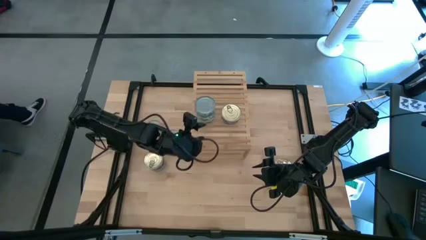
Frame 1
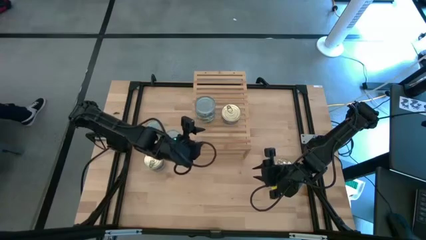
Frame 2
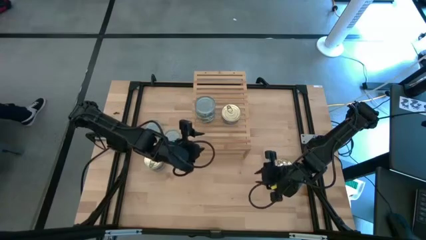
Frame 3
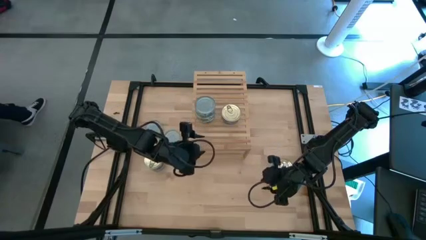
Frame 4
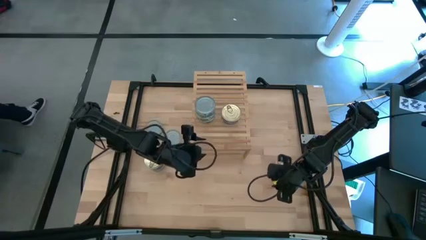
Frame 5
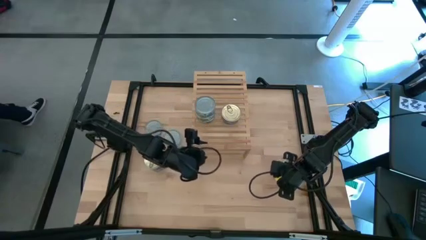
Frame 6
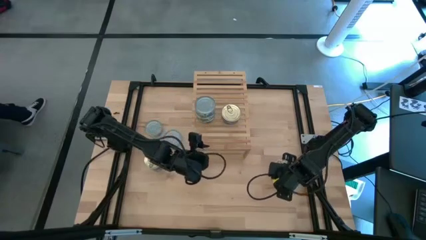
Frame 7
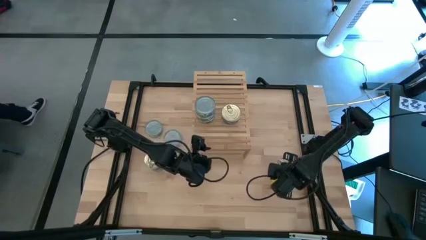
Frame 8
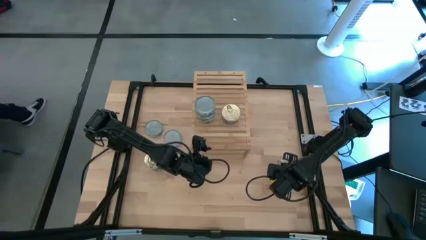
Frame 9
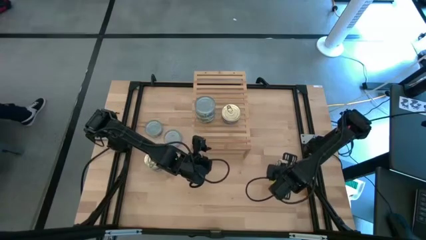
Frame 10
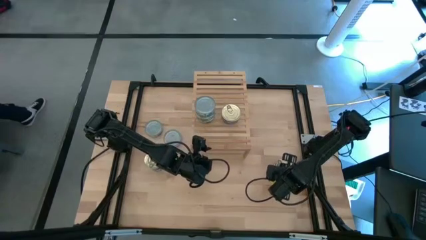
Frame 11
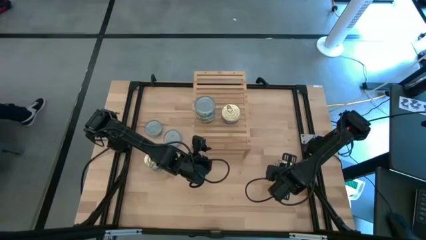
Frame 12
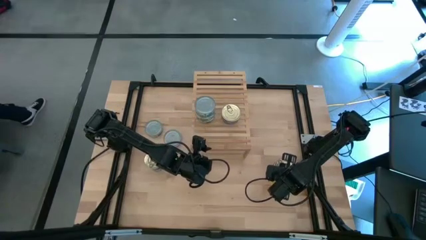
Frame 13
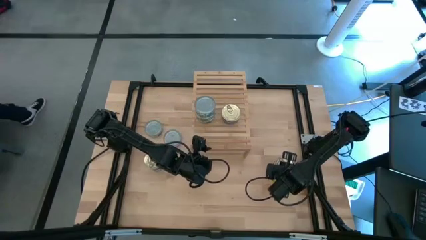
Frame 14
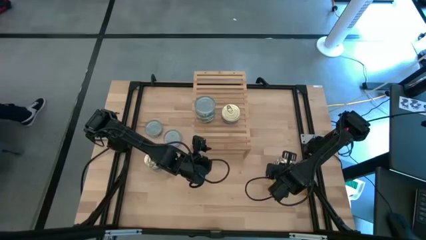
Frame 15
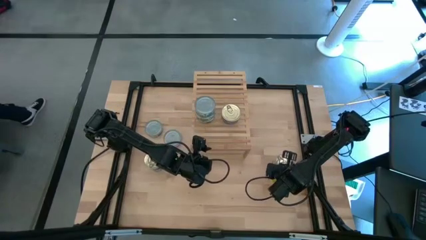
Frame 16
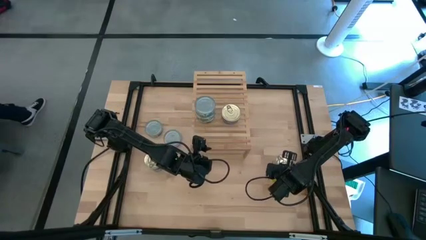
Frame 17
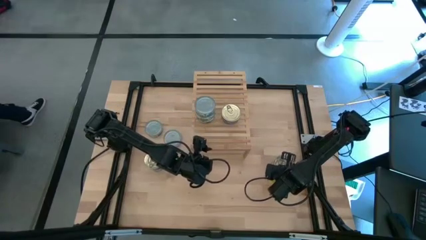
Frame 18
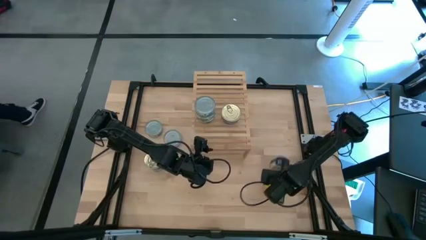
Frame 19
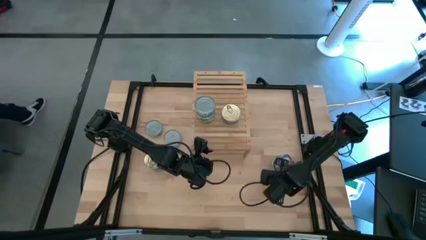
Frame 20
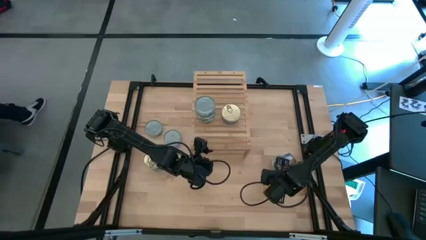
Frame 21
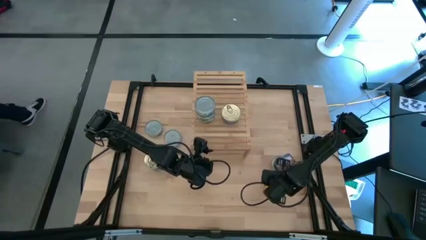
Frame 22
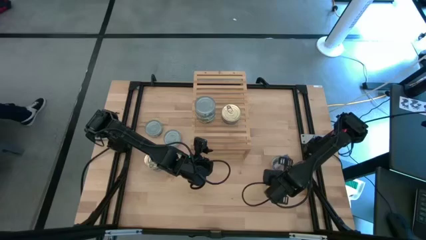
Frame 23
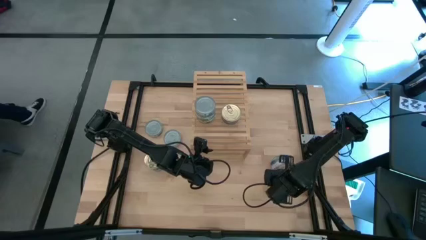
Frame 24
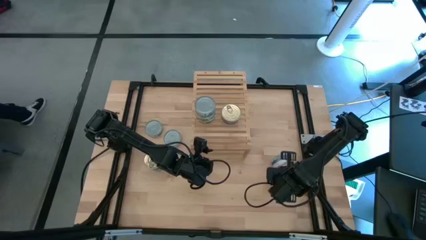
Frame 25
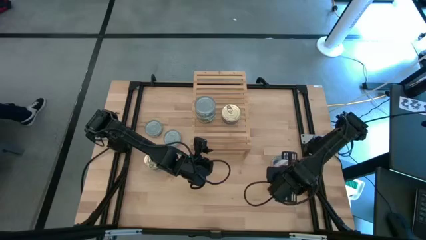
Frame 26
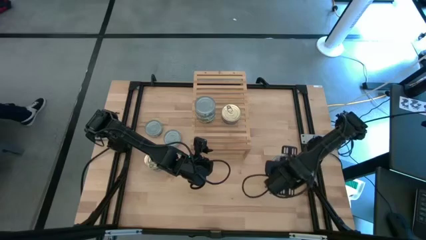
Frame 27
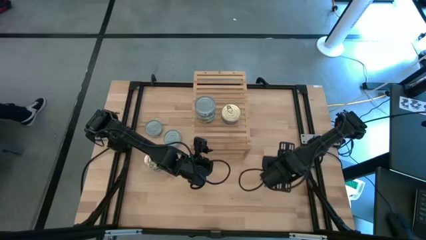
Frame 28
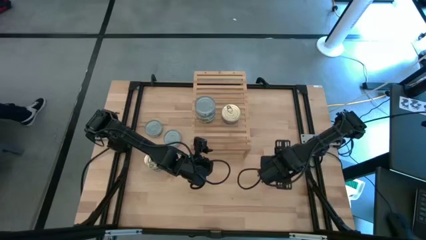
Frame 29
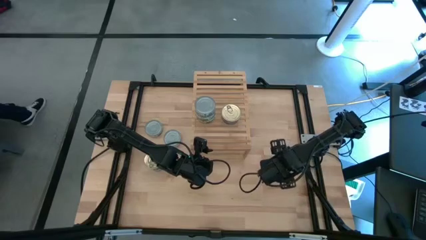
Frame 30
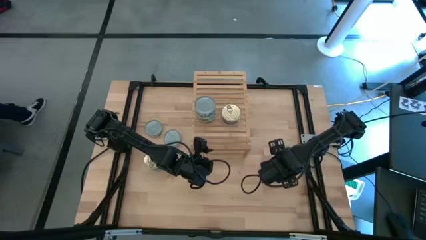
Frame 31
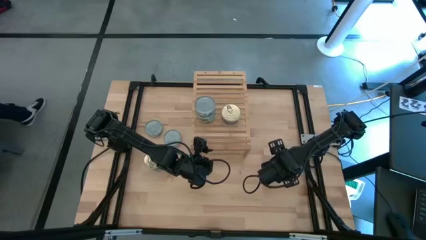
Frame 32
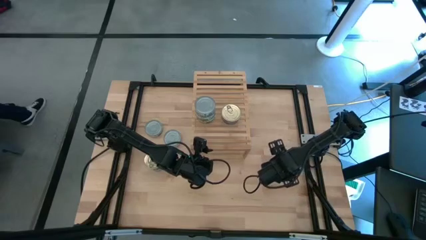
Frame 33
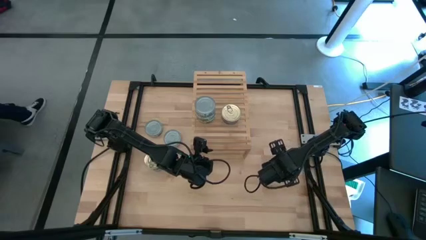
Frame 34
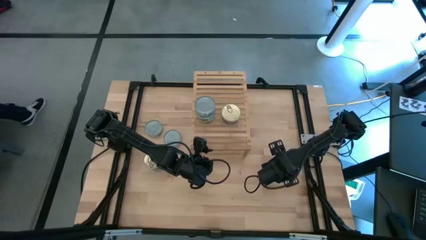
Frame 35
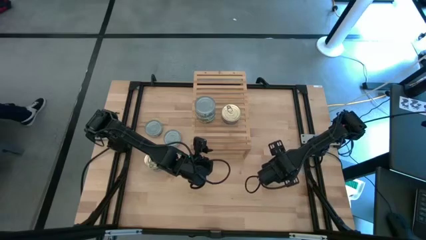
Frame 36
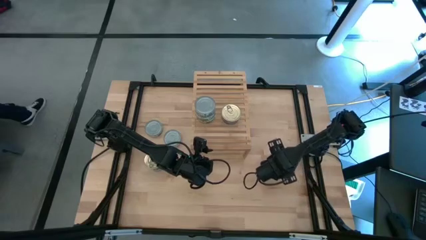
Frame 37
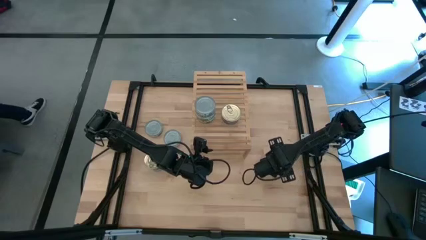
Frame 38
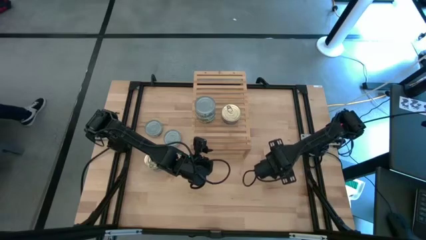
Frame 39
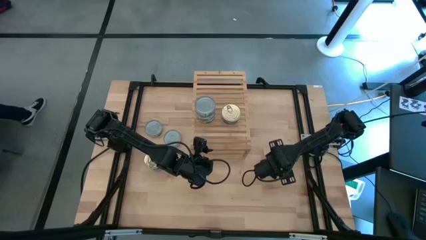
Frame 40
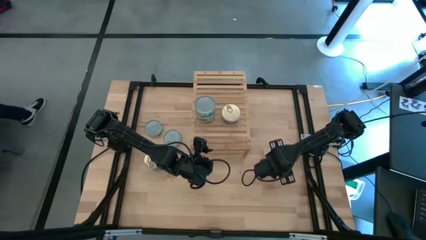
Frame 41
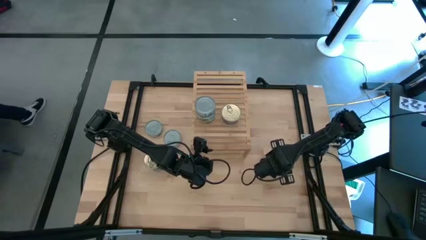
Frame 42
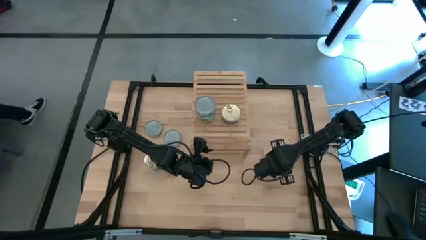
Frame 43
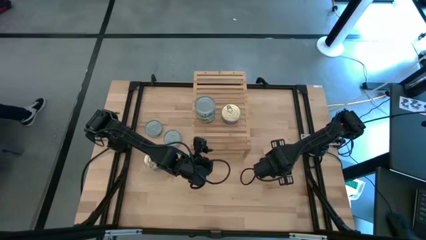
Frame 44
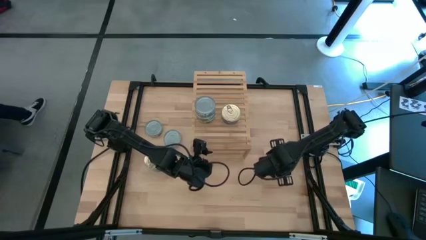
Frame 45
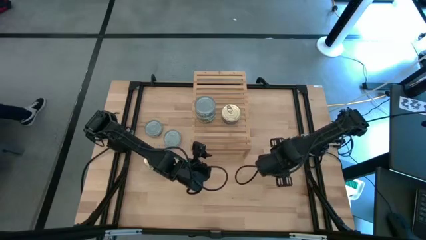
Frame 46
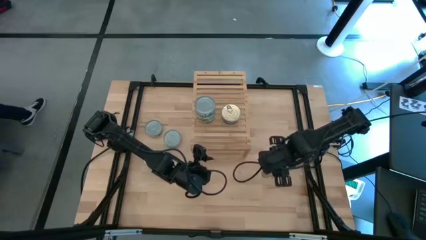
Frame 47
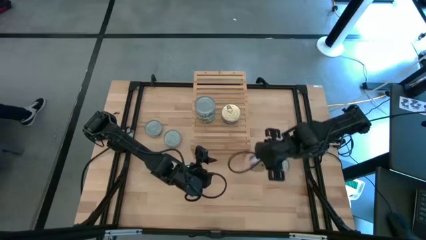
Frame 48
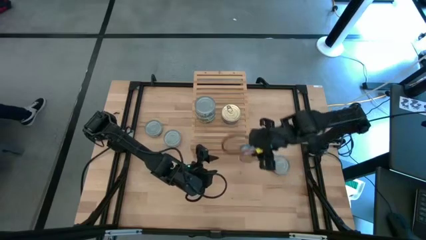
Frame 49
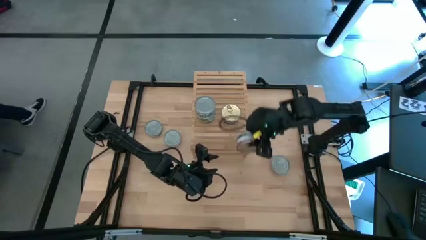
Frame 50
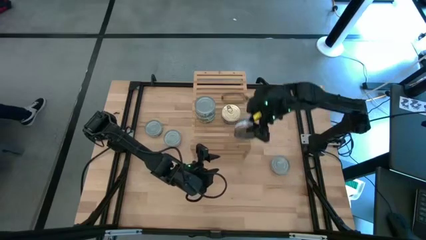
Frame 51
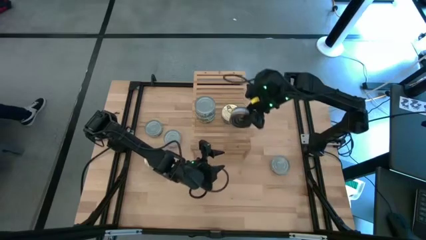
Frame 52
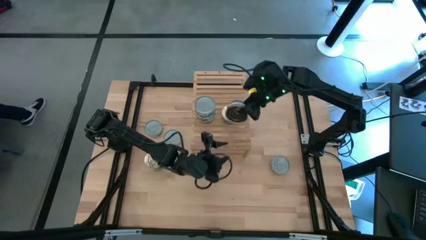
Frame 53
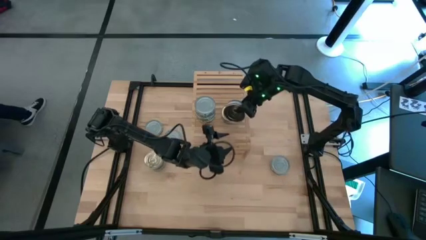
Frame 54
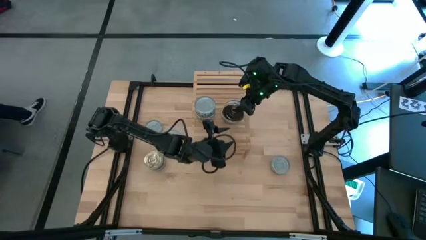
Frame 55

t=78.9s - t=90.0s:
Task: Stack canned seafood by type on shelf
Stack the blue tuna can on top of the blue tuna can on the shelf

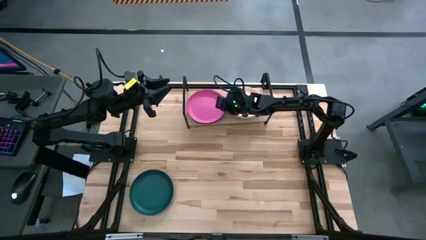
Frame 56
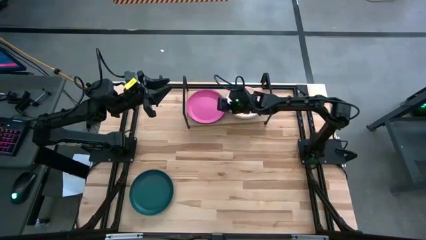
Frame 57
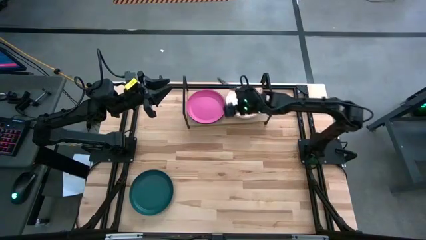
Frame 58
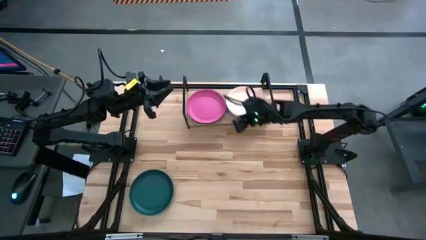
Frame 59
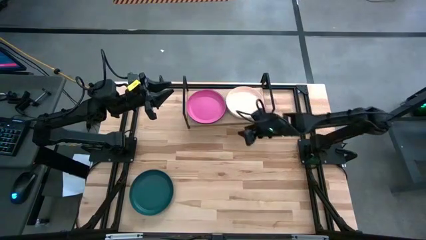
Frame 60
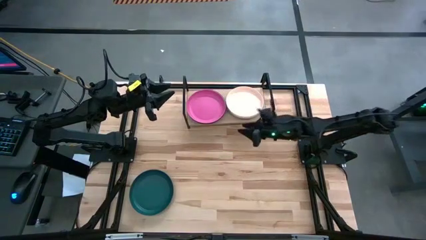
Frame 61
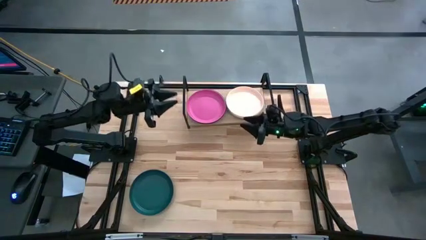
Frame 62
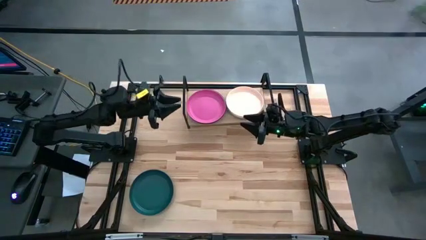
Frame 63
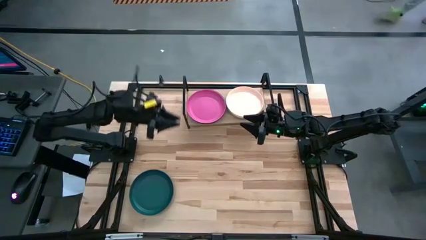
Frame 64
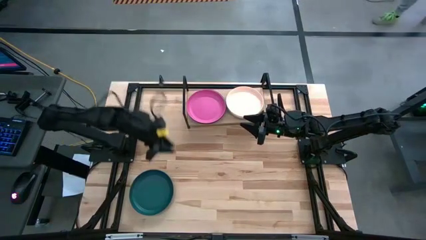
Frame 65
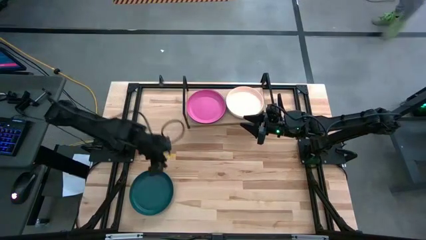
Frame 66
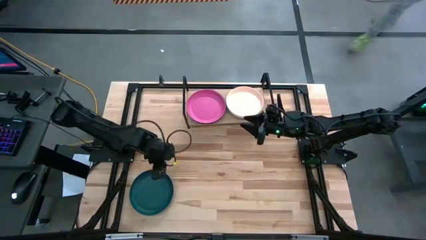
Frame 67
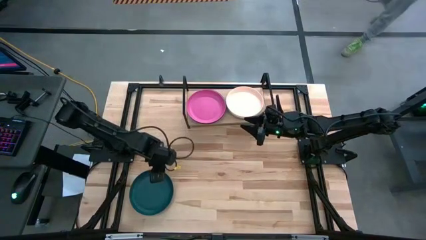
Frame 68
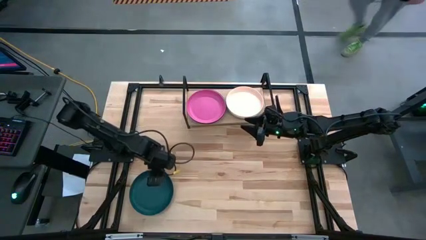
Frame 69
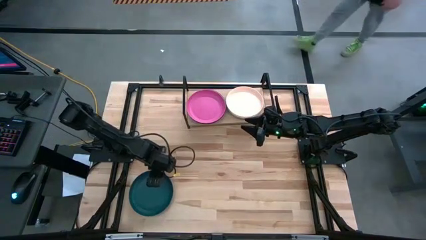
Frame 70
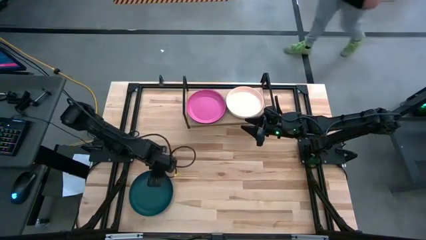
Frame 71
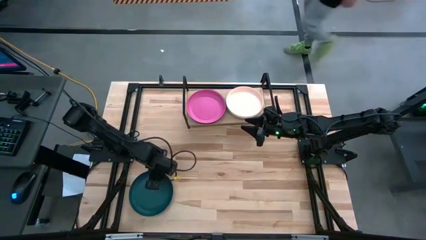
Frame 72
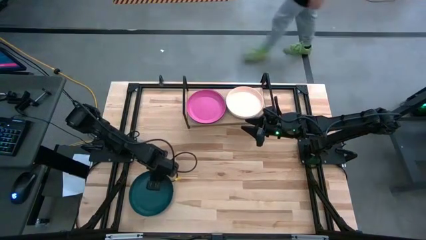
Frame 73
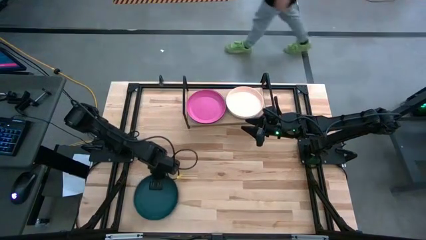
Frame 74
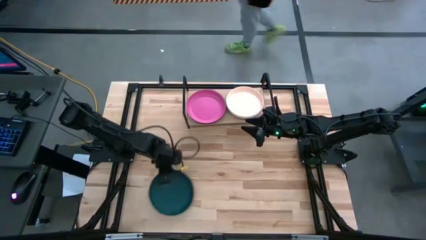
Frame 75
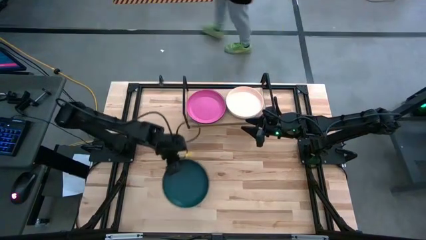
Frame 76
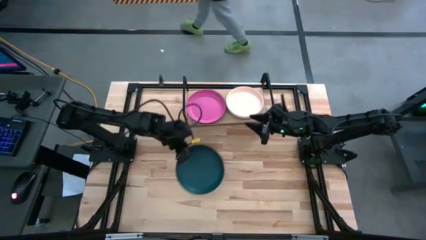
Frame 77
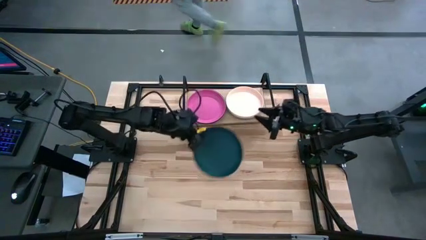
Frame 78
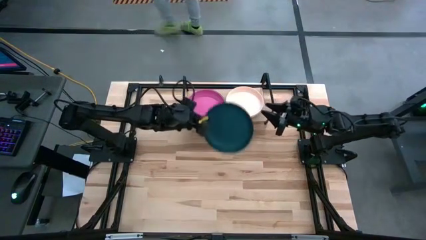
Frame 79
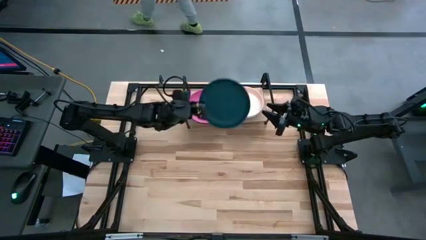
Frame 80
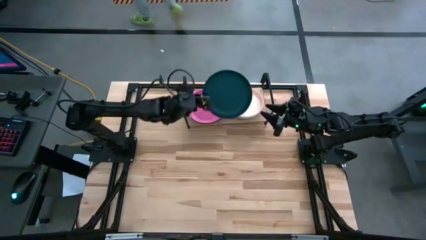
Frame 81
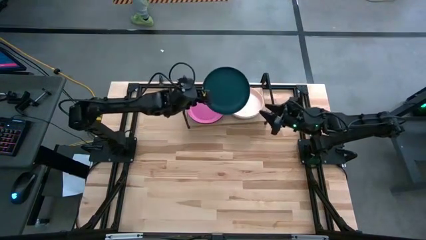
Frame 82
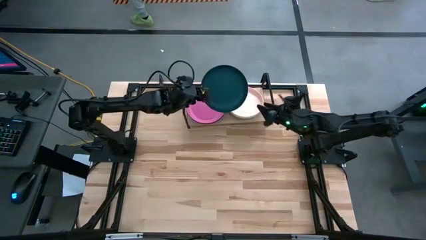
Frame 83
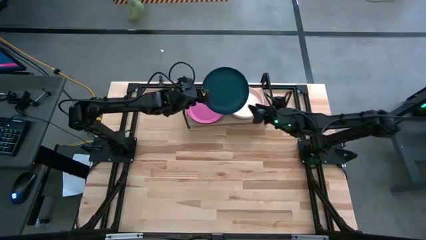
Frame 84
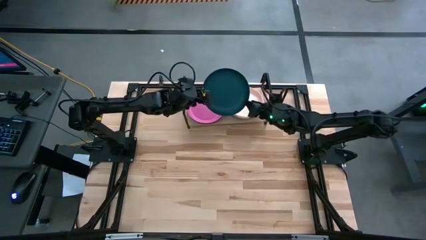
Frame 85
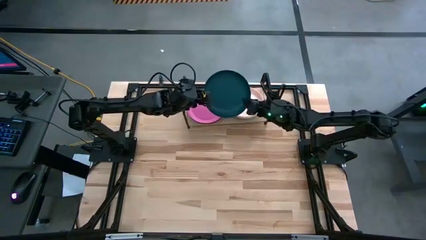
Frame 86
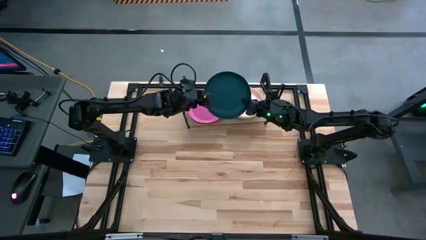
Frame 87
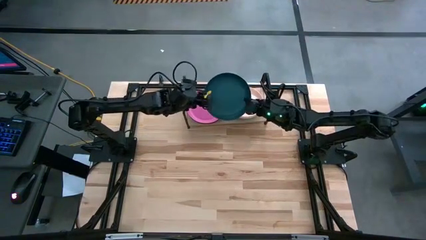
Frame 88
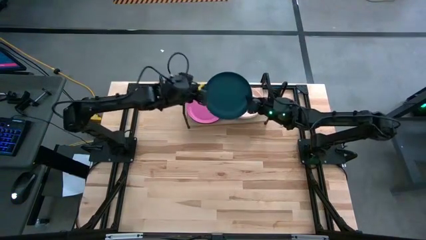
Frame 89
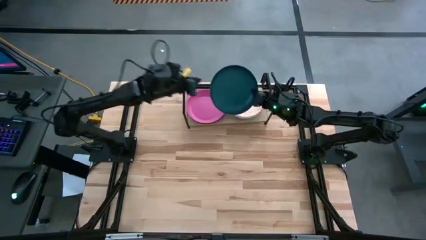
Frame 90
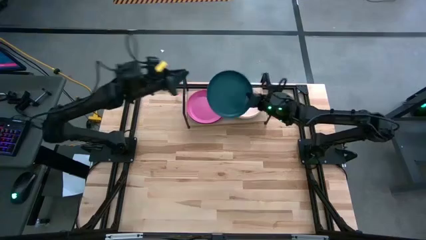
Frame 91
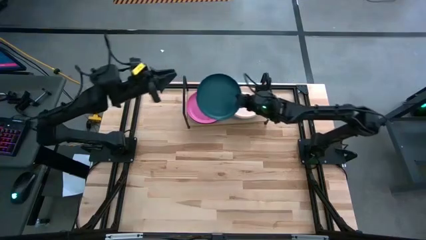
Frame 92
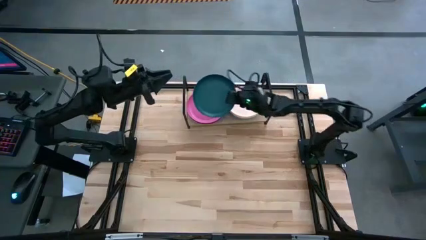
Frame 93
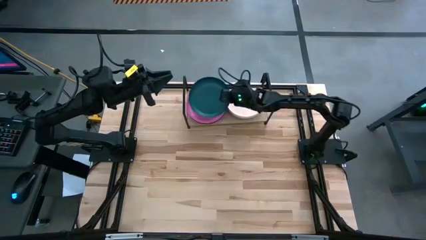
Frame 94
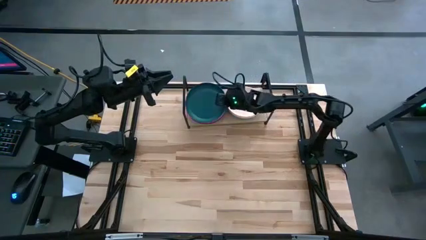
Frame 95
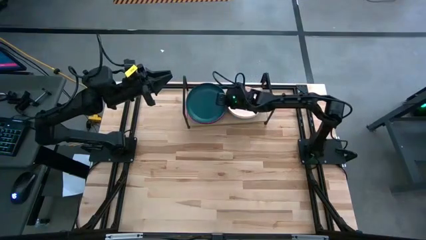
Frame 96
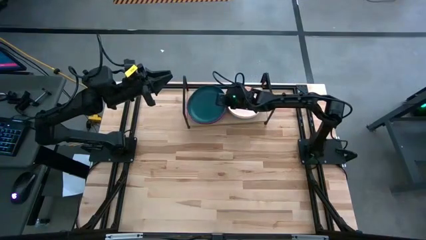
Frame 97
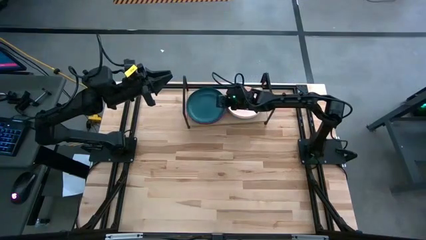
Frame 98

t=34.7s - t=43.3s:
Task: Place and stack plates onto a shelf
Stack the green plate on top of the pink plate on the shelf
